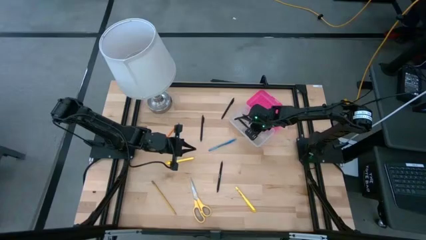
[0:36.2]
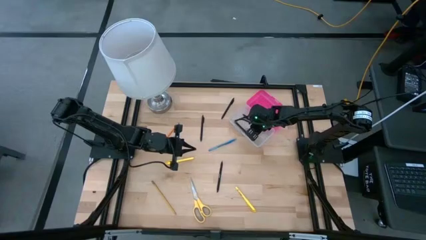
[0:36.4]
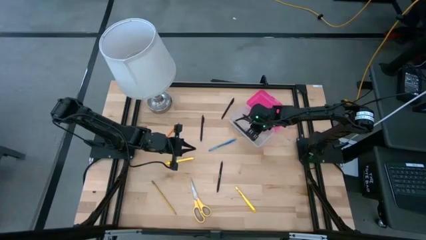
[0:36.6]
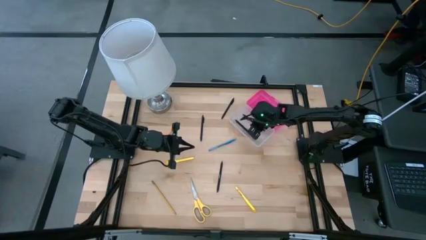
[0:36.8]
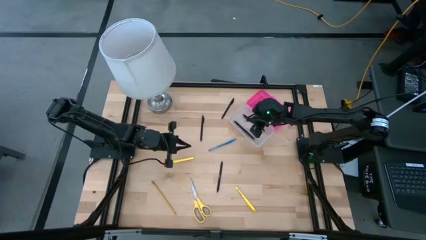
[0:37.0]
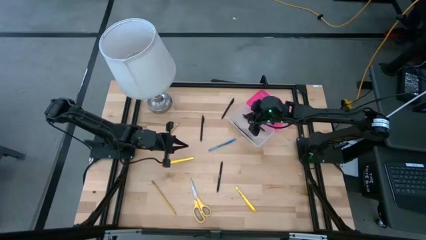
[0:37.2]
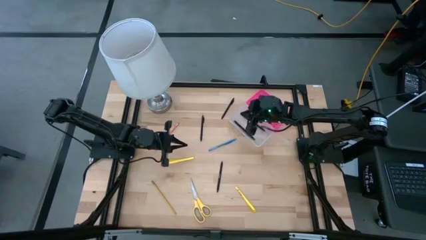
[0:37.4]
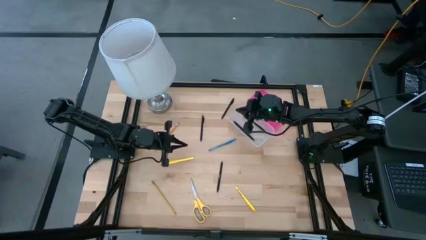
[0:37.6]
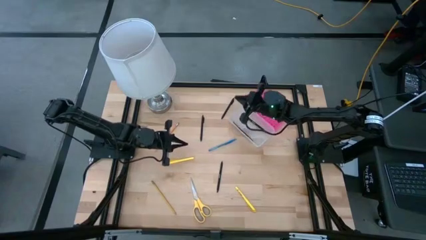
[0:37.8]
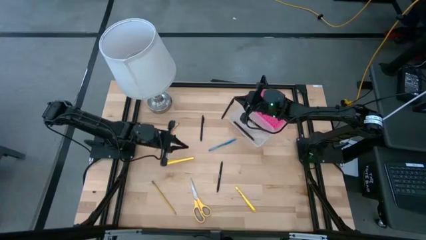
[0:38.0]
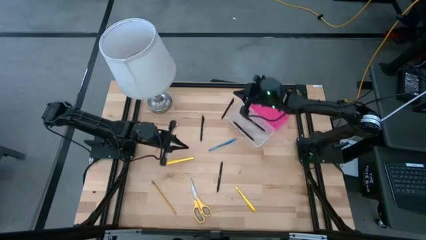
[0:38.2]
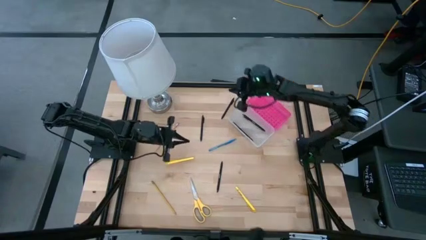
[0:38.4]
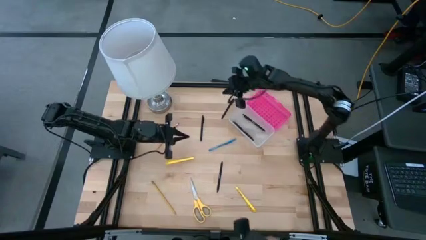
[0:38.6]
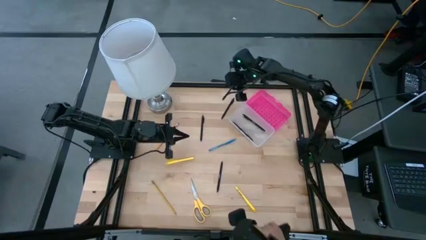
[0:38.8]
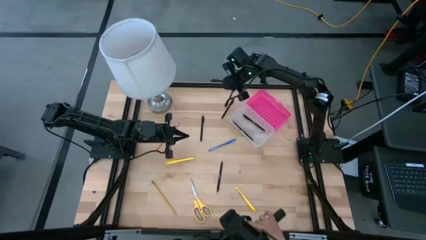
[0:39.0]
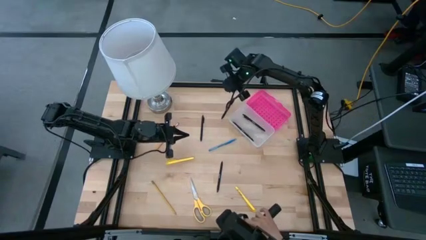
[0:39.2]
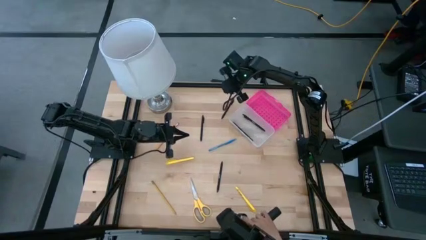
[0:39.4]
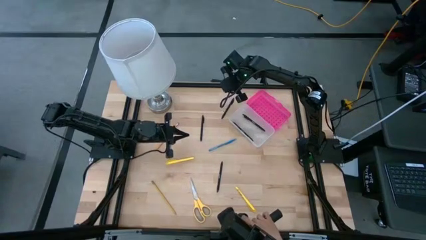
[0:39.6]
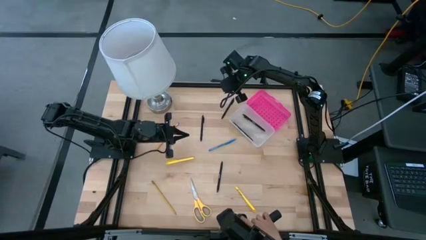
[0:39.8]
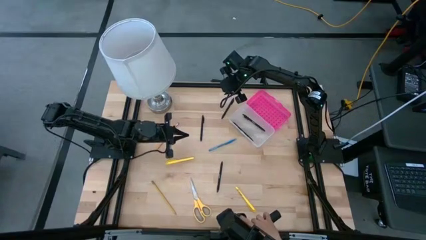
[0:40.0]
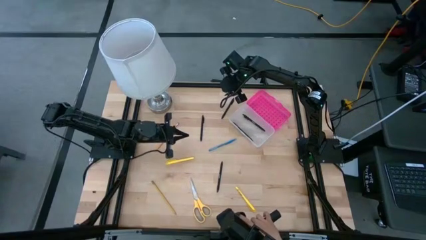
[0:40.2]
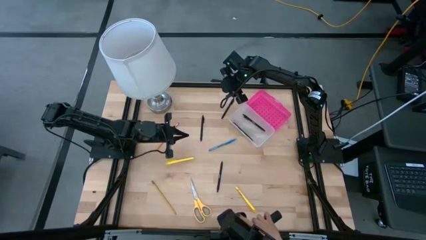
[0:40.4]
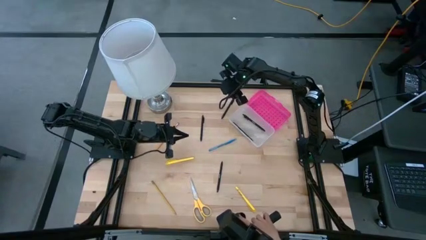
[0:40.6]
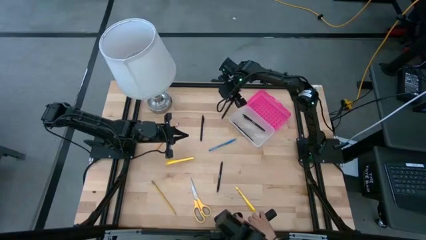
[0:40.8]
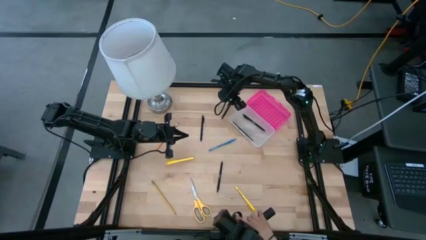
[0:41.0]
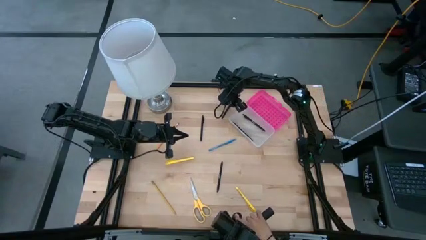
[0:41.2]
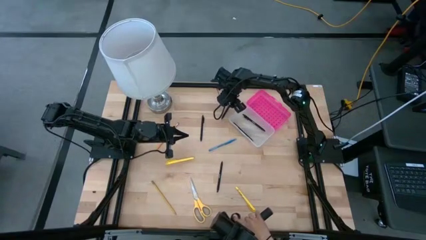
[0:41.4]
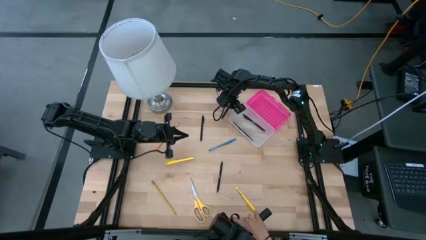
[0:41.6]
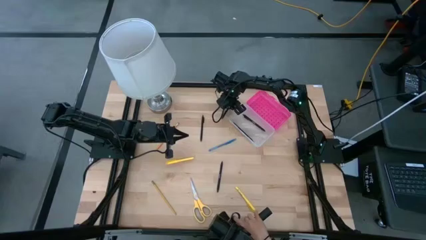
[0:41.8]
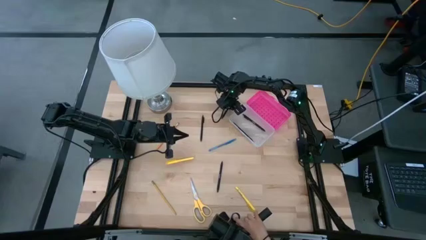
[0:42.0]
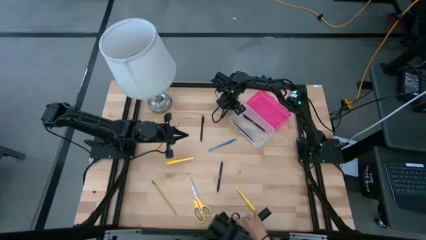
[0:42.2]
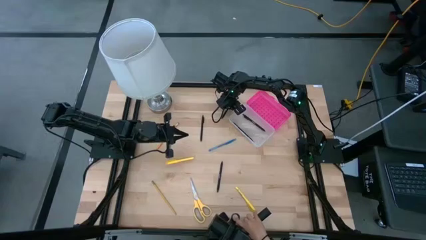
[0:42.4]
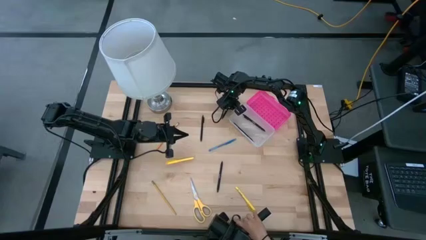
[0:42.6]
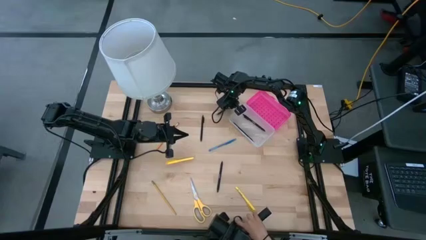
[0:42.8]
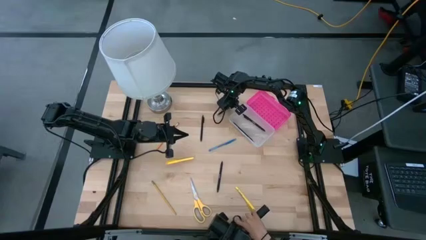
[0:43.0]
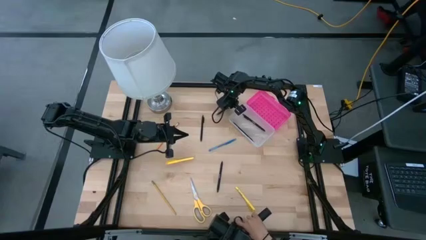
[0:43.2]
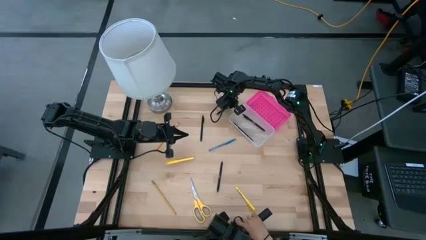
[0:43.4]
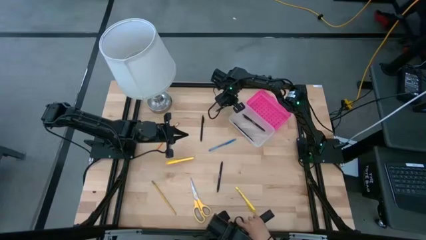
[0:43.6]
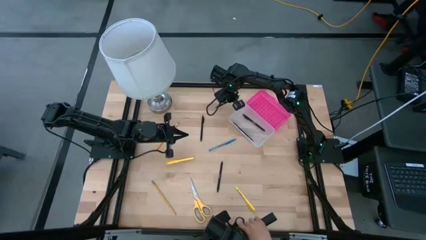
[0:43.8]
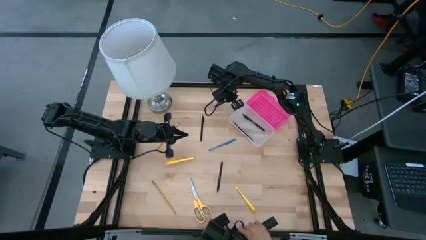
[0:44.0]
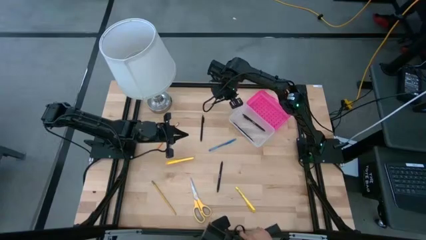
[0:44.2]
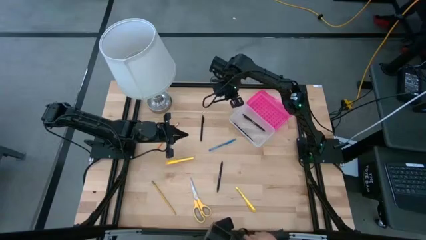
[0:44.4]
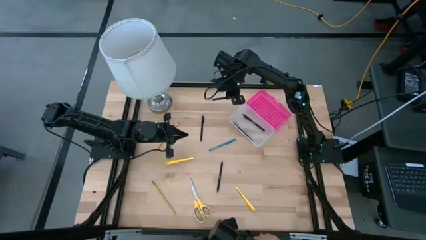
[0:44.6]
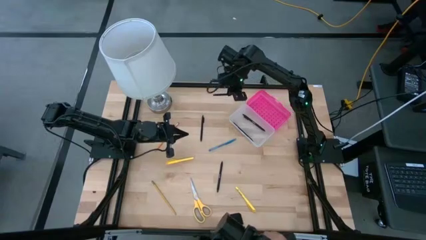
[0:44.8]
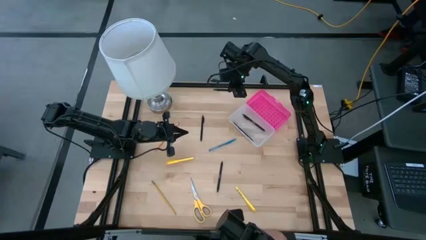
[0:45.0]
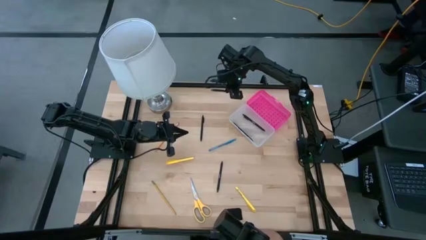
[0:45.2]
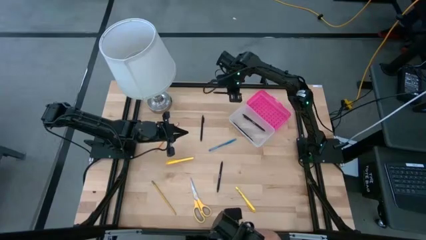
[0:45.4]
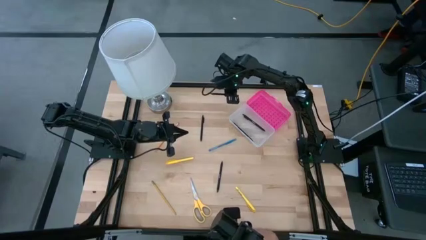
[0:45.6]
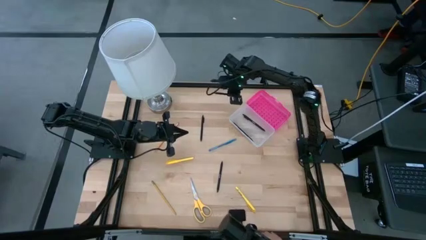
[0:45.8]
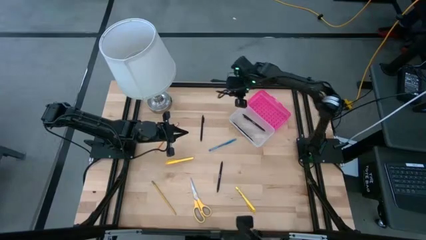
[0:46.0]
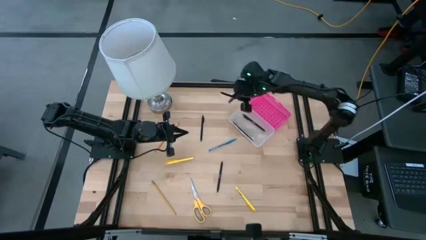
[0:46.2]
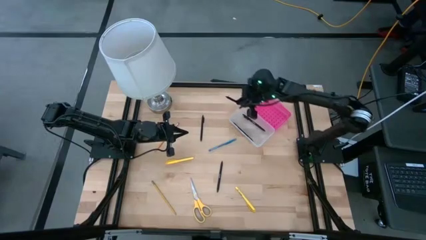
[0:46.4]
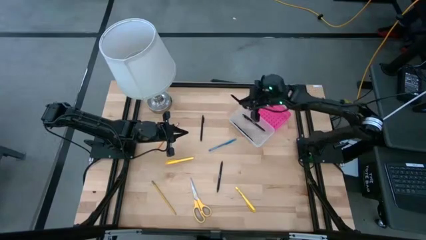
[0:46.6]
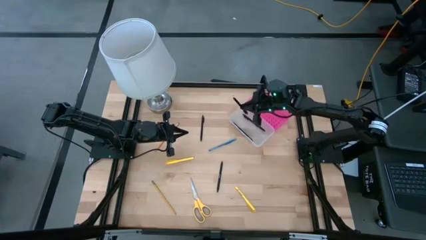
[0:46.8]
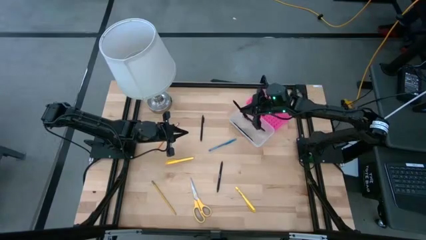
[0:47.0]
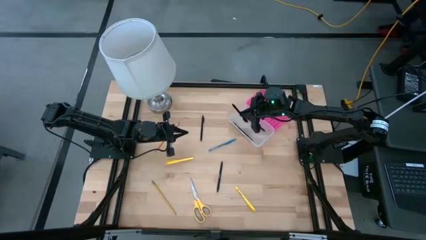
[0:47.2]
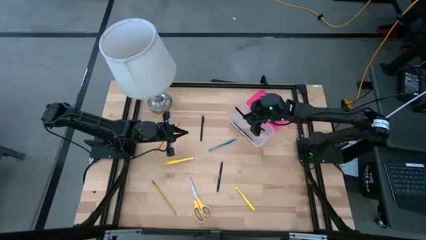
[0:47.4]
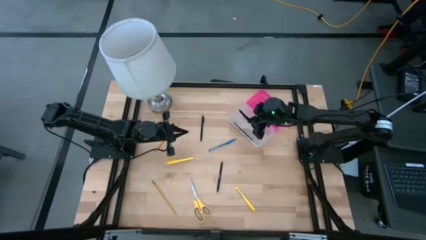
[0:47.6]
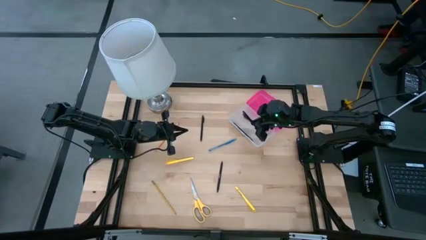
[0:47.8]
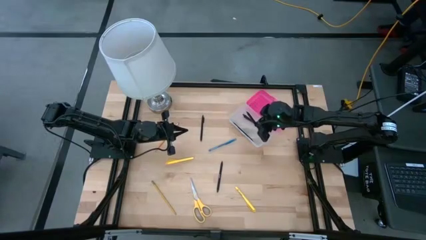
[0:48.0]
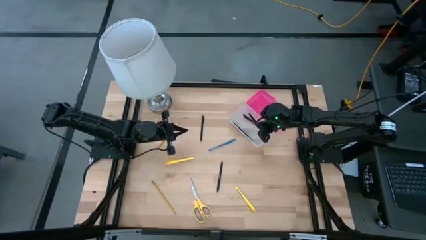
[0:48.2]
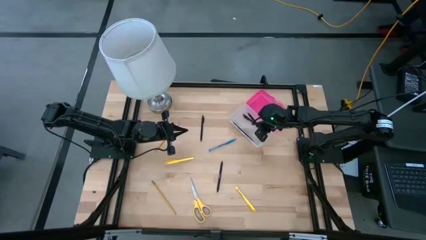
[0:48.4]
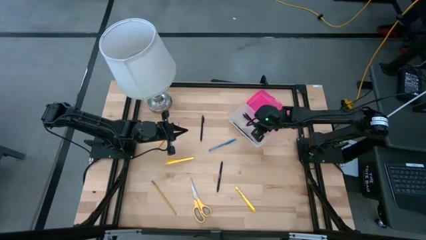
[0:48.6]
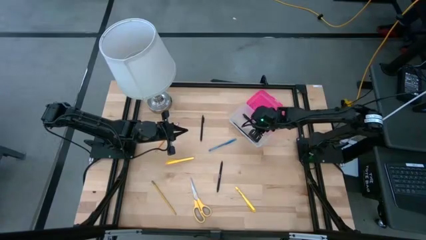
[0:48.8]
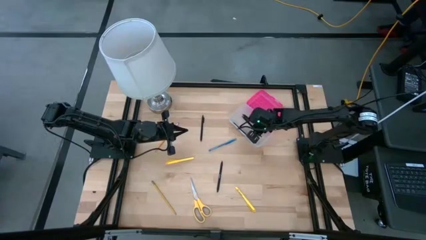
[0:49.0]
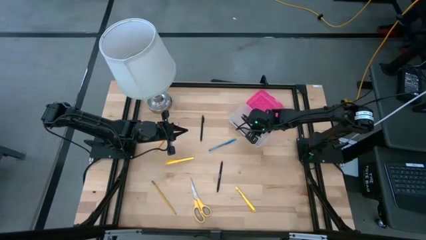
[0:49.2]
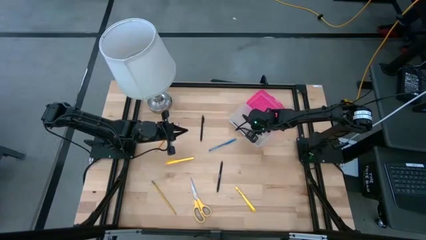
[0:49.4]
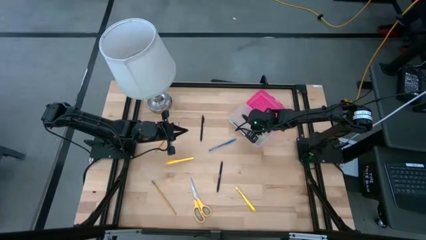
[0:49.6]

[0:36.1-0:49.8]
Task: Pick & place school supplies into a supply box
Put the black pen into the pink supply box
